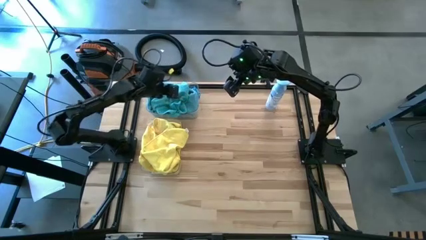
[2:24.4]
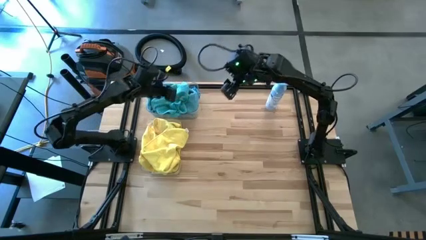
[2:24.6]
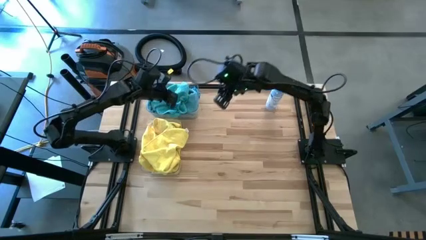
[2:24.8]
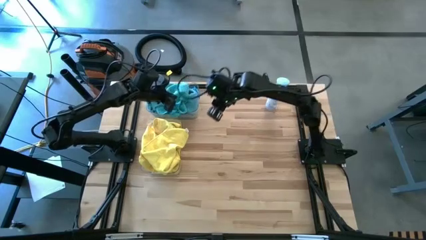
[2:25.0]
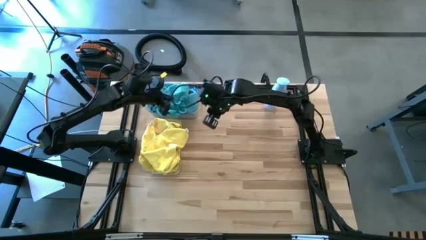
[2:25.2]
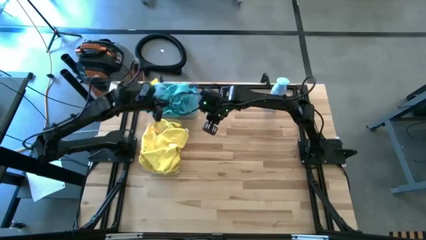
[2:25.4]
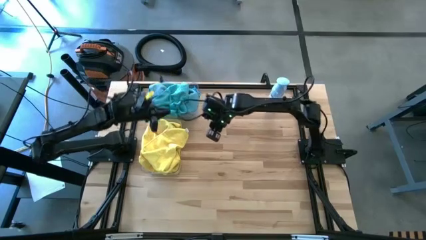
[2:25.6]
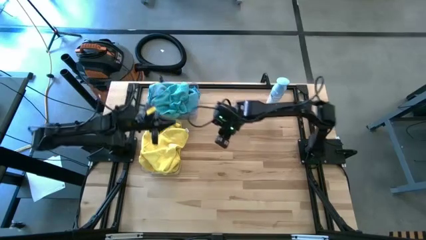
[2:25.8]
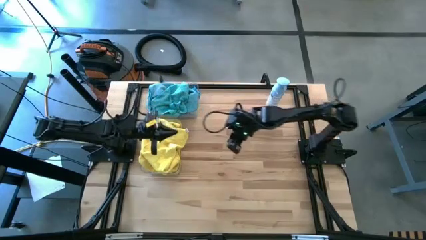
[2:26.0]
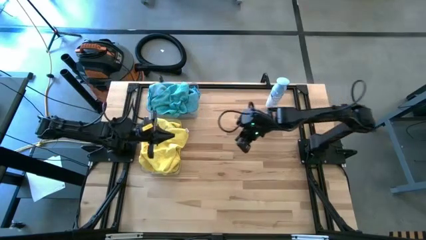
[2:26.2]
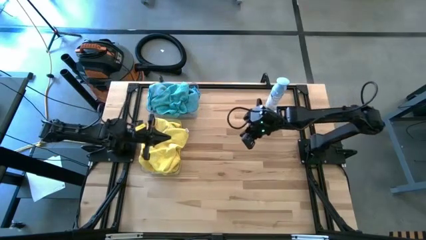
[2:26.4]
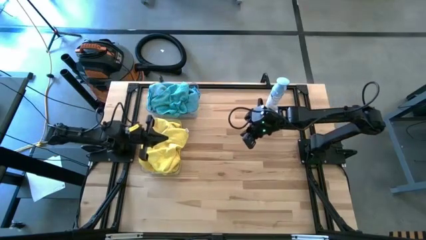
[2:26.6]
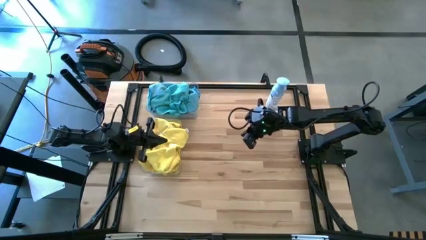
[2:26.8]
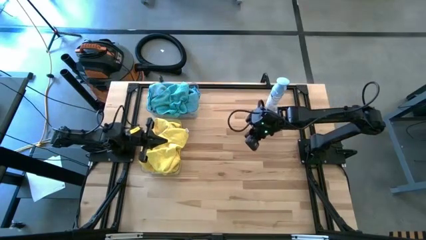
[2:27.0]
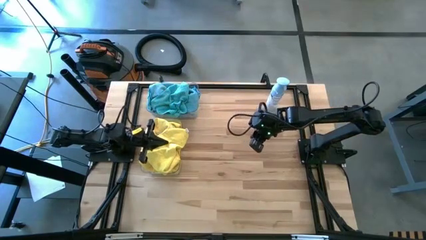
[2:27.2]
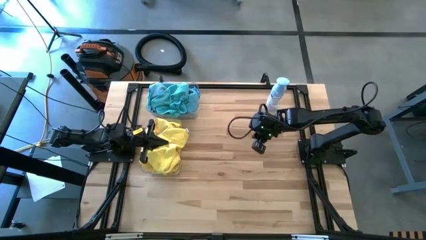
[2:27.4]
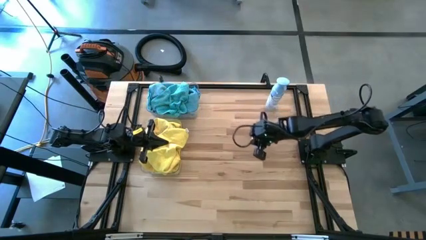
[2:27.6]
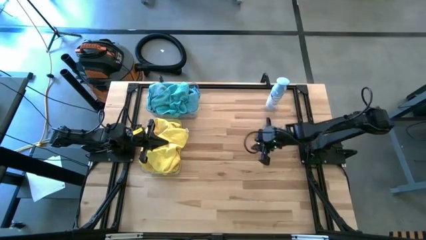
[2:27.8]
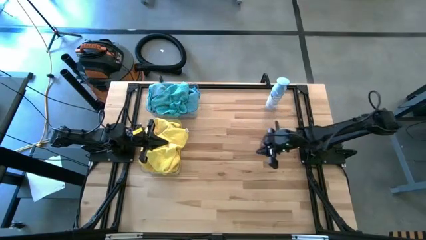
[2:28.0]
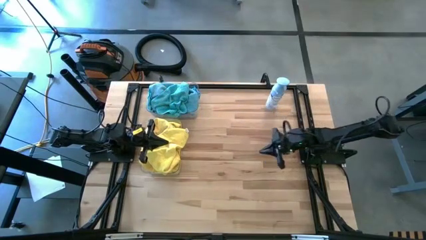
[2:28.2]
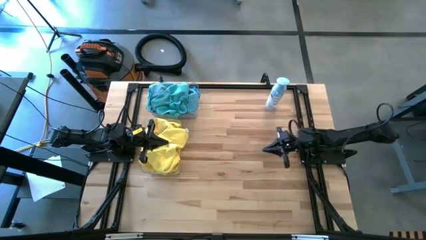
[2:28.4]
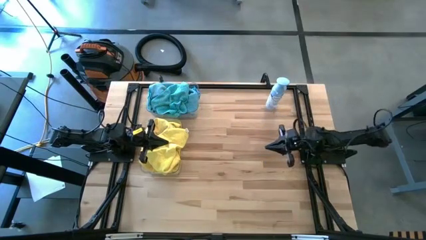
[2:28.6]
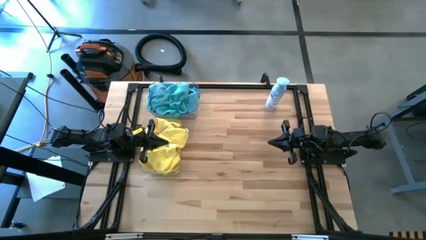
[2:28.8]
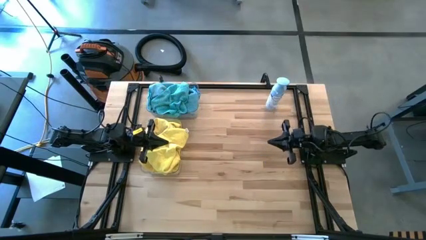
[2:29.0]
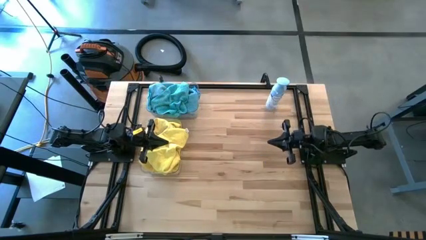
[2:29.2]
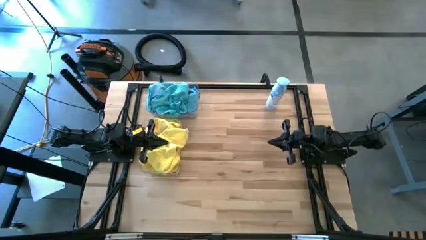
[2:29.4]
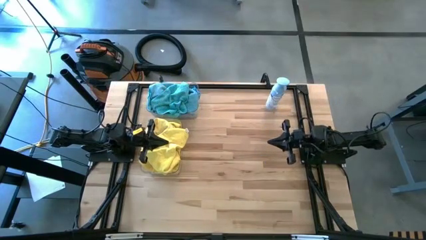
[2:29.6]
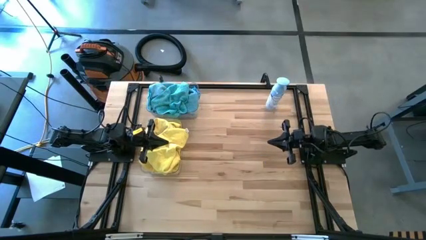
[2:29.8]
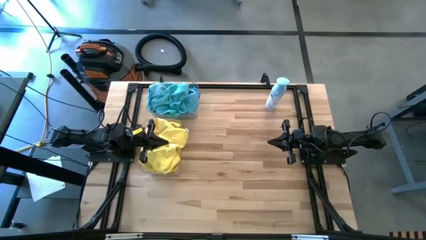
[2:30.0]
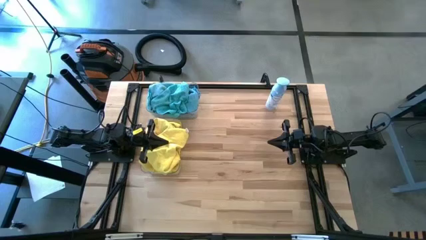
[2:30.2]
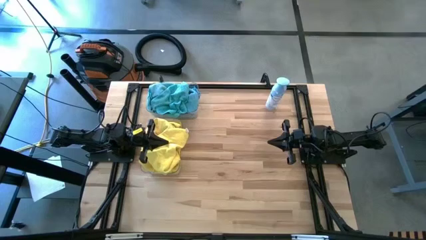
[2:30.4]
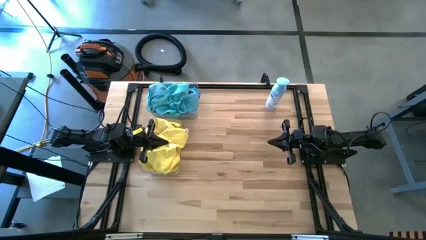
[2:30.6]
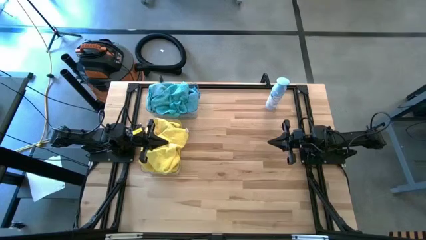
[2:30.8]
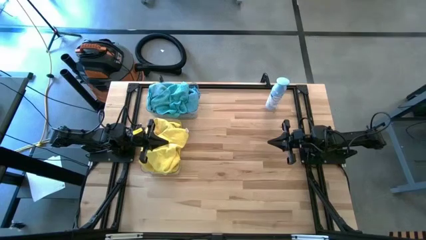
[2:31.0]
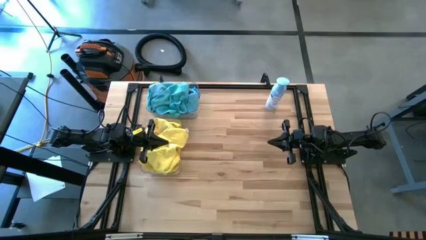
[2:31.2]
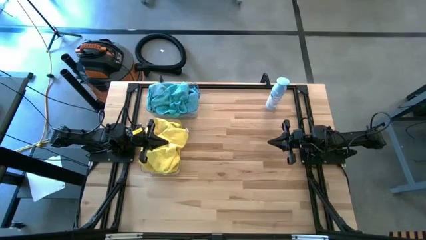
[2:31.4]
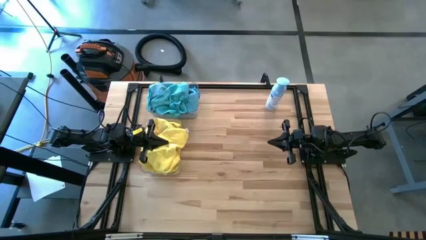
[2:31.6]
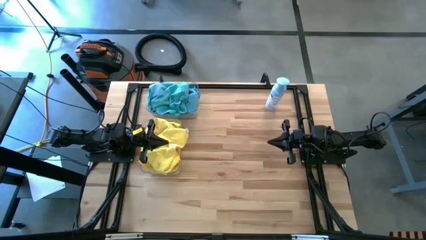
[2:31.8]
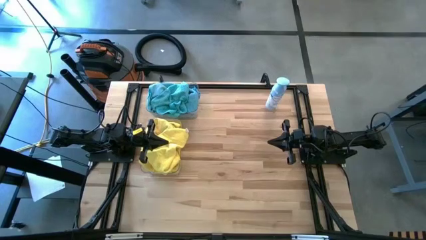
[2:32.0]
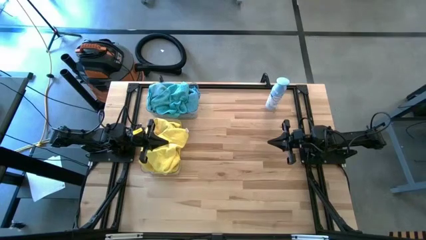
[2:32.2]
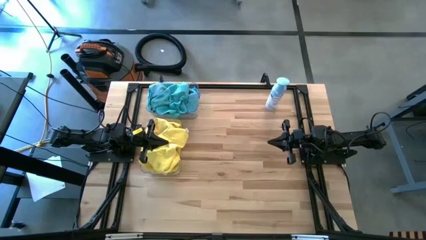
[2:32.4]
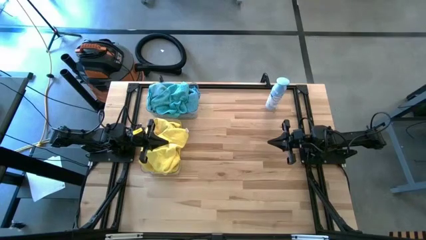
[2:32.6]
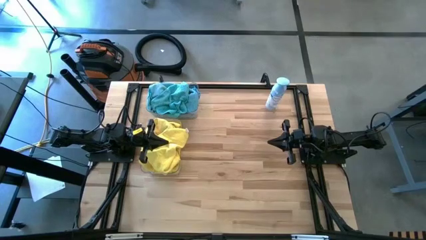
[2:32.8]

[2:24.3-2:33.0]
Task: Sort microfiber towel by color & place in baskets
Return to Home Position

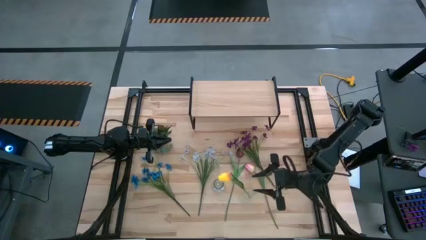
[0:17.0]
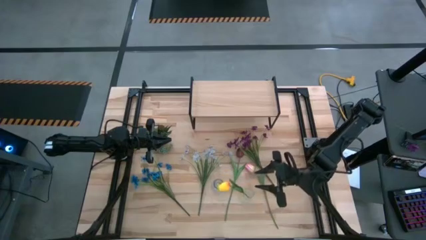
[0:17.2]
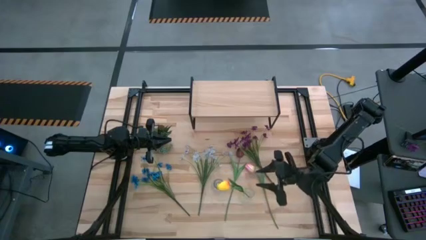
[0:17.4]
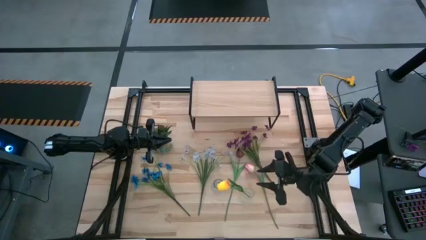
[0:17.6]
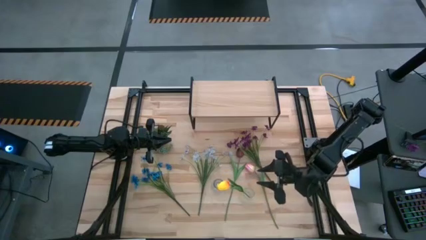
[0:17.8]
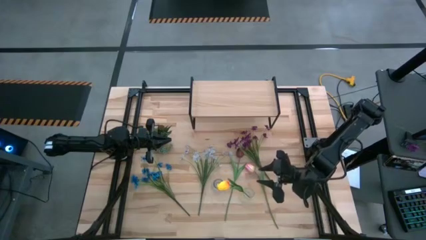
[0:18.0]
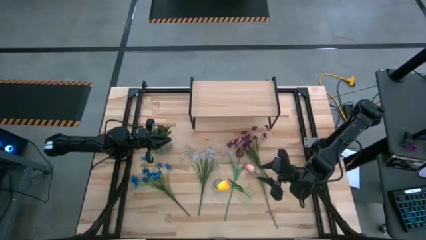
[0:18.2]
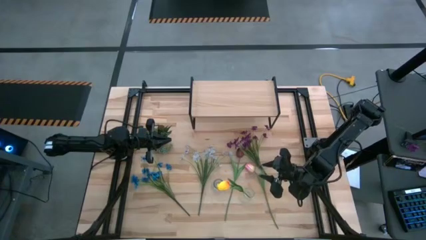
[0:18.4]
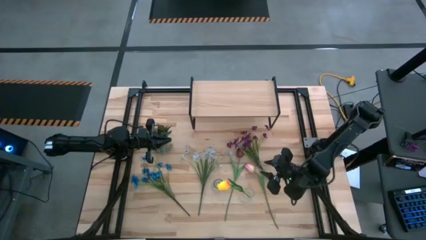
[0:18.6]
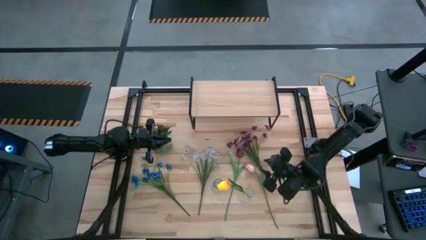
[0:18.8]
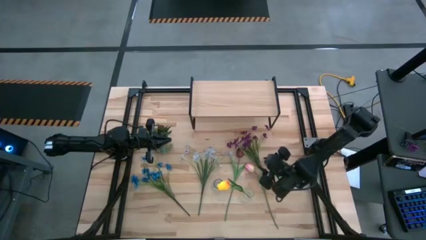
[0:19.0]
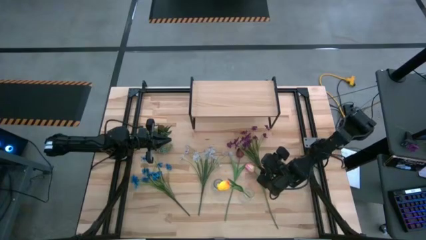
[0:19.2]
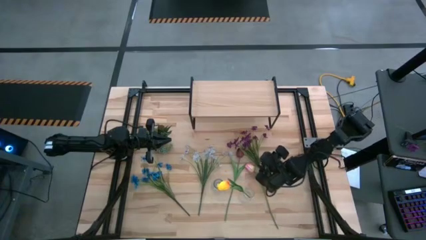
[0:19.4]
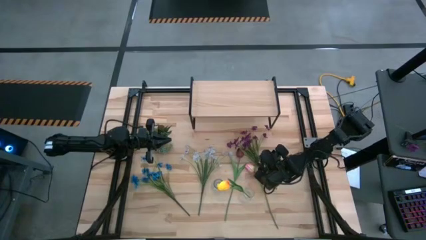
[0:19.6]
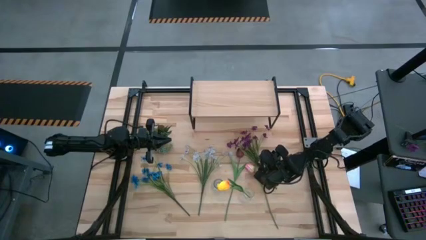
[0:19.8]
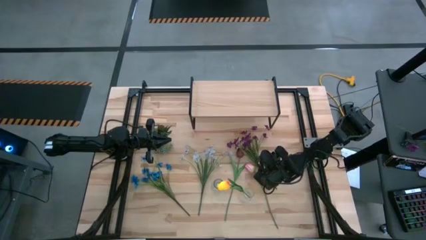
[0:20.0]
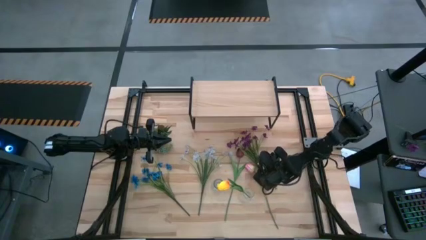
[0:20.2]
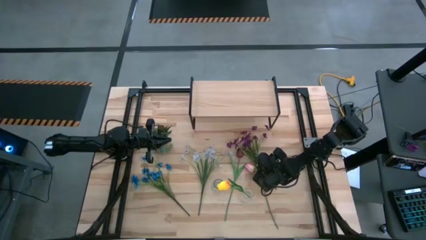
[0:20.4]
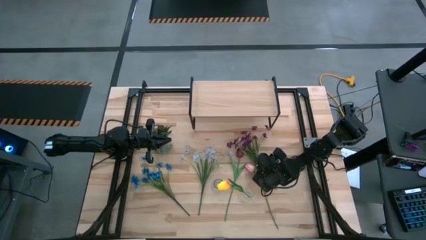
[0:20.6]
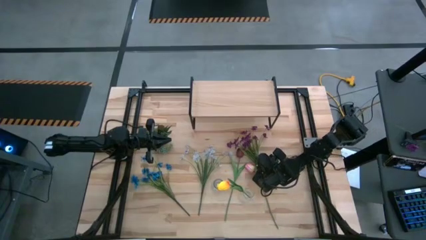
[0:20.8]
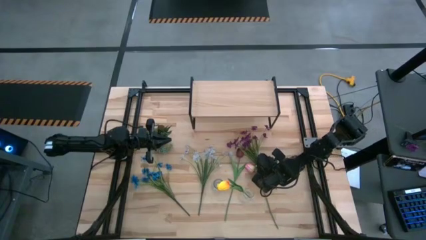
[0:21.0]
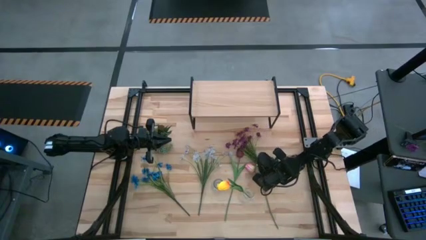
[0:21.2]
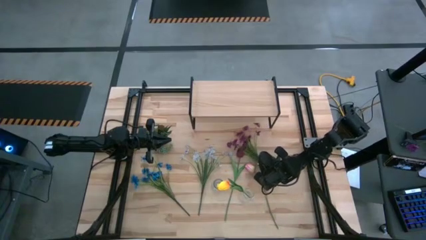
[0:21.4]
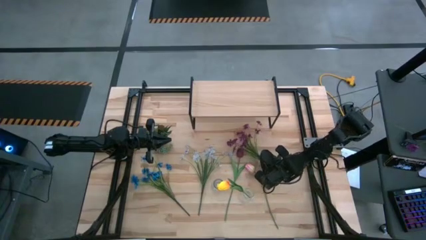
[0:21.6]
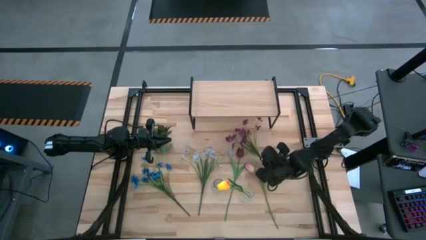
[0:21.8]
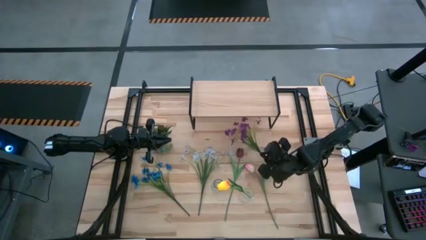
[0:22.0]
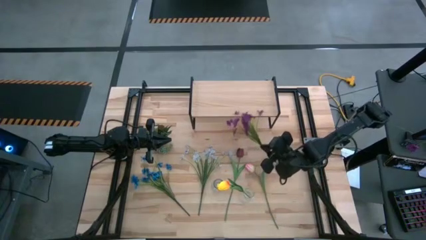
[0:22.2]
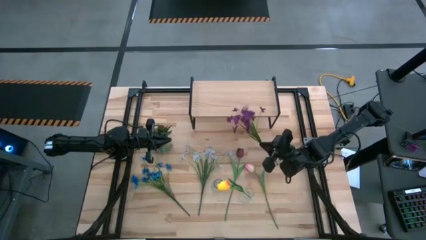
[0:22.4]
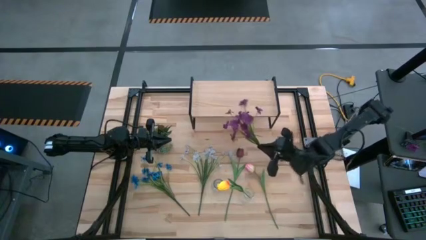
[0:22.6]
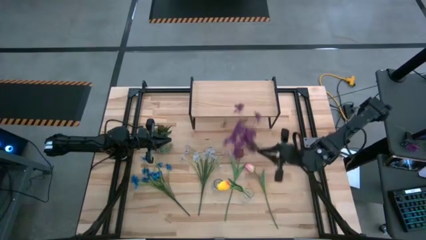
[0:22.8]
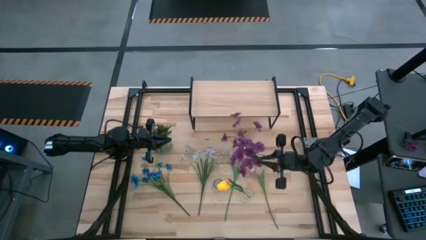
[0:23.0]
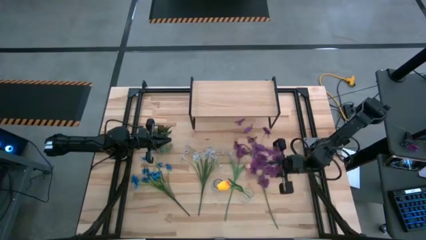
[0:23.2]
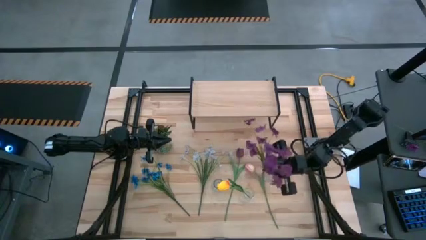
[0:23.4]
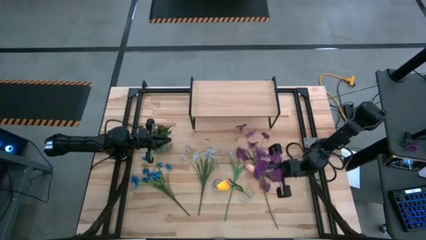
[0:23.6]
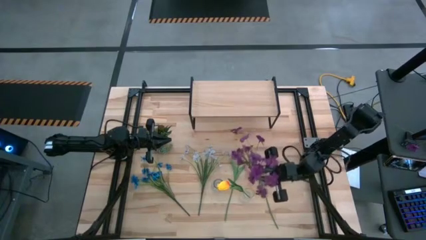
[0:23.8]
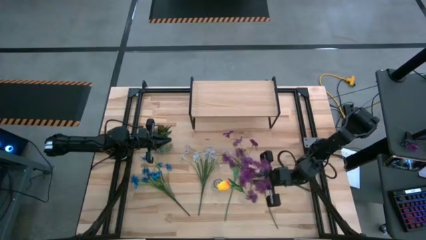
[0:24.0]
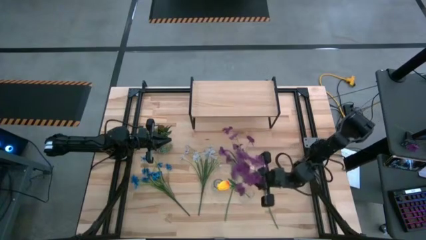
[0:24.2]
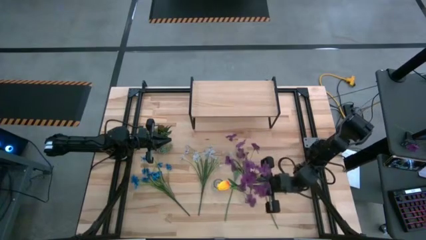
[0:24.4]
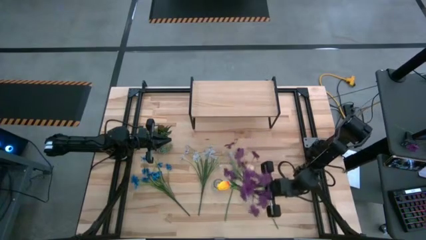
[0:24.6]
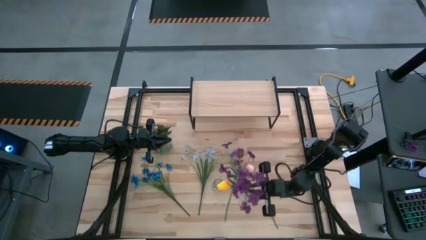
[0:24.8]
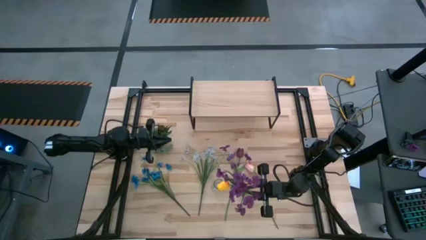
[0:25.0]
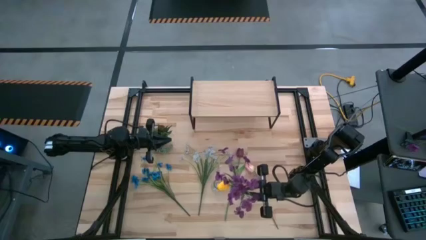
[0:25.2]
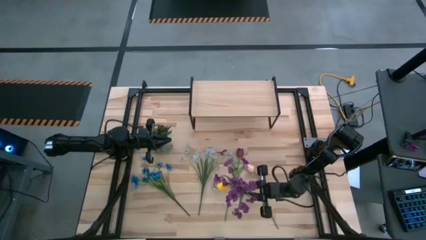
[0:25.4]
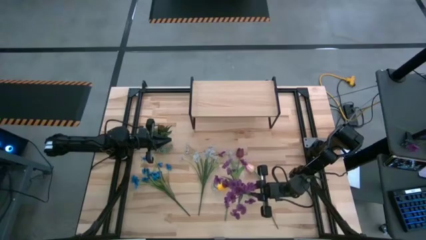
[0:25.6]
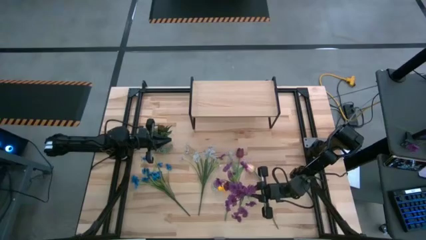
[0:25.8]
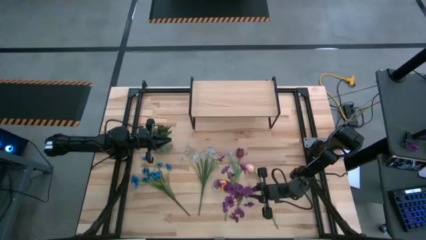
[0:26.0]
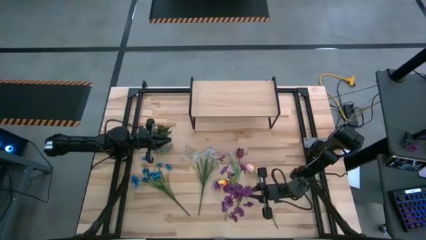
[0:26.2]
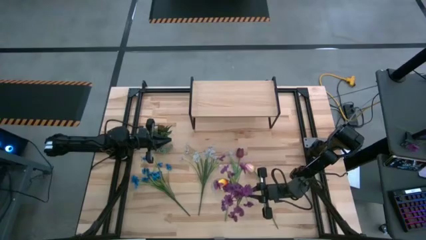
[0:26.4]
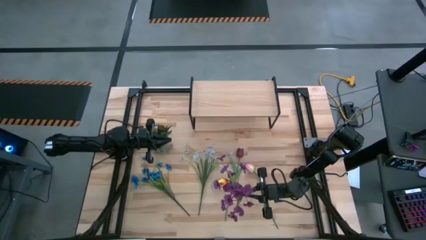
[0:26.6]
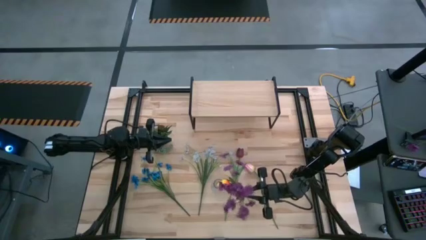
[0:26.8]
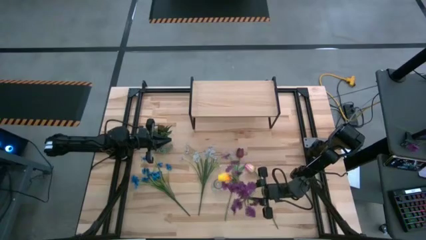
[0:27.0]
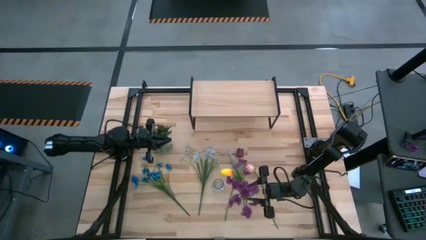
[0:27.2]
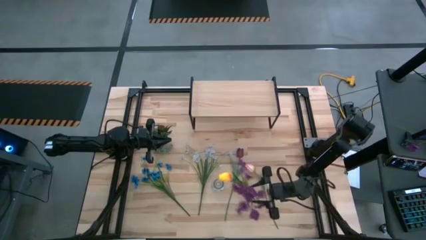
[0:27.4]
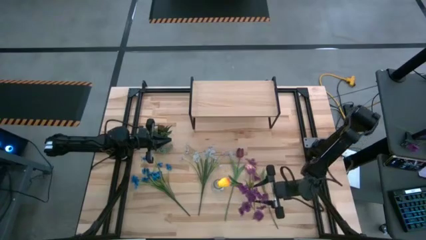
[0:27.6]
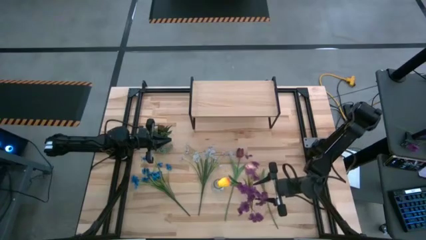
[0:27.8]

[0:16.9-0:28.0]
Task: Pick and place flowers into a vace then onto a shelf
Put the violet flower into the right transparent vase
